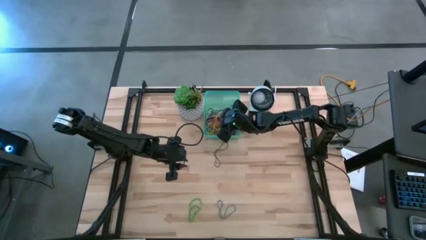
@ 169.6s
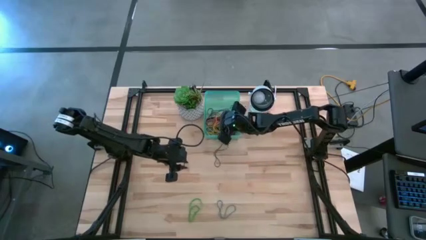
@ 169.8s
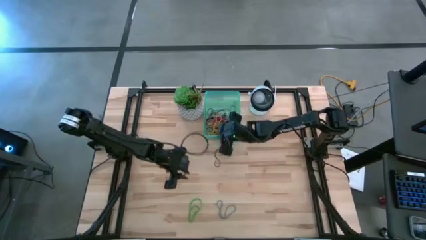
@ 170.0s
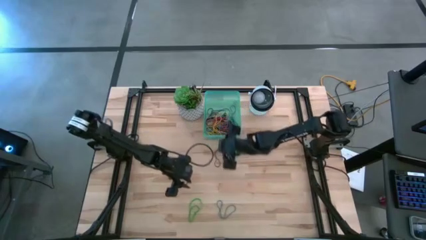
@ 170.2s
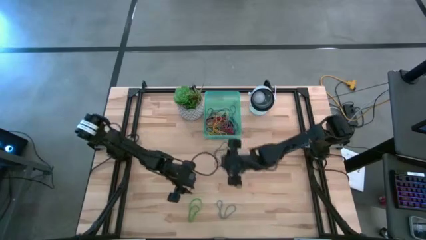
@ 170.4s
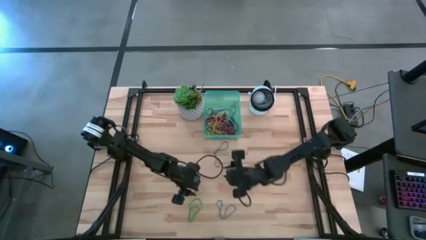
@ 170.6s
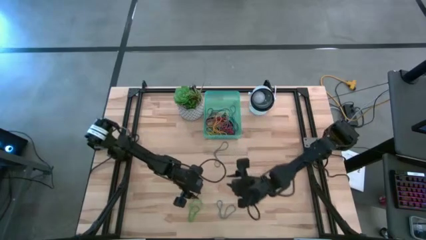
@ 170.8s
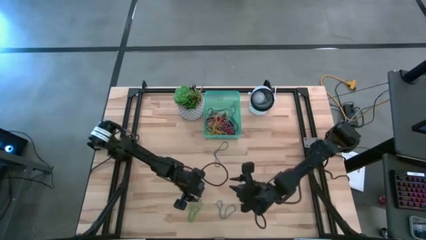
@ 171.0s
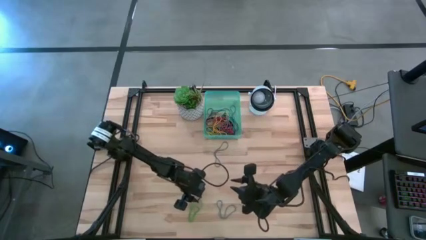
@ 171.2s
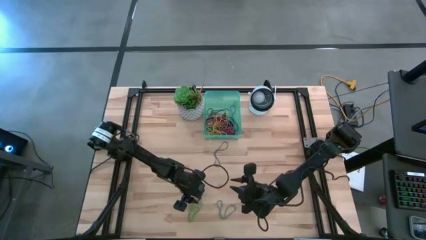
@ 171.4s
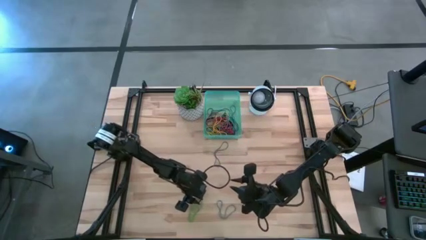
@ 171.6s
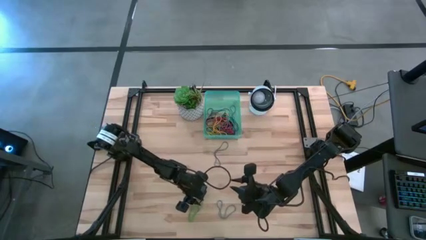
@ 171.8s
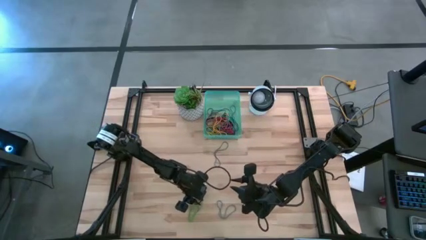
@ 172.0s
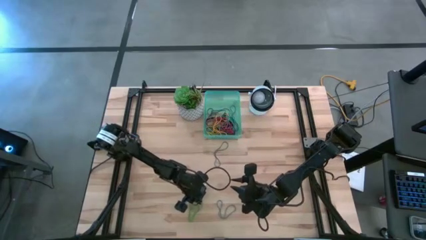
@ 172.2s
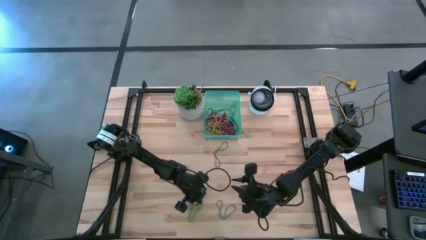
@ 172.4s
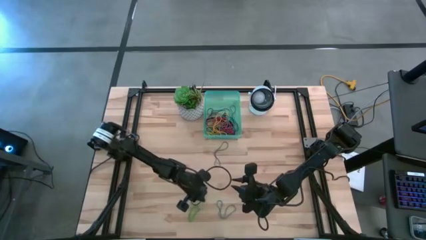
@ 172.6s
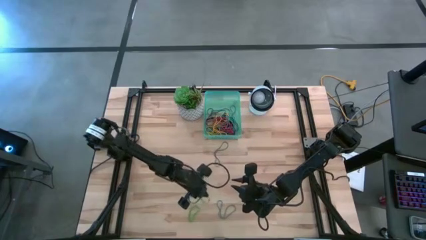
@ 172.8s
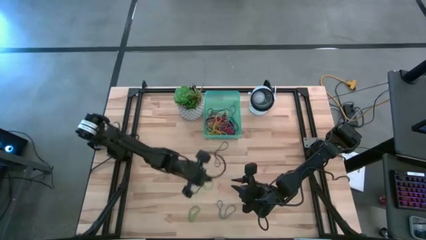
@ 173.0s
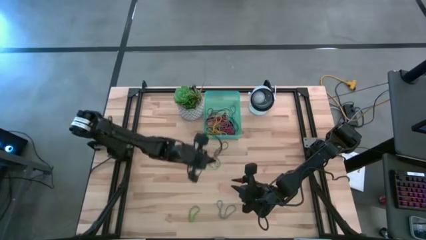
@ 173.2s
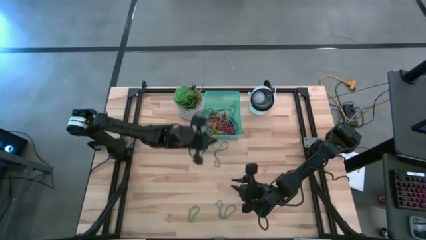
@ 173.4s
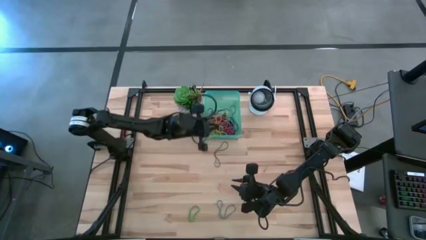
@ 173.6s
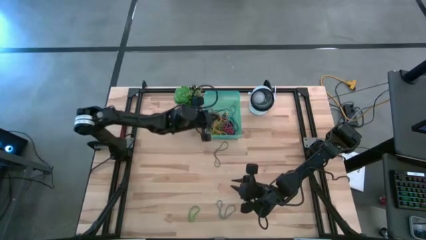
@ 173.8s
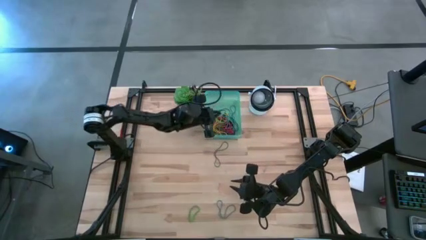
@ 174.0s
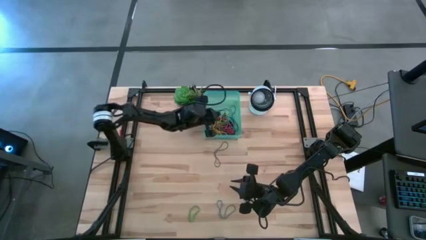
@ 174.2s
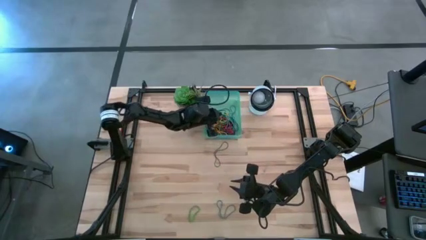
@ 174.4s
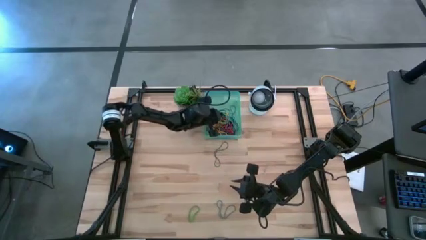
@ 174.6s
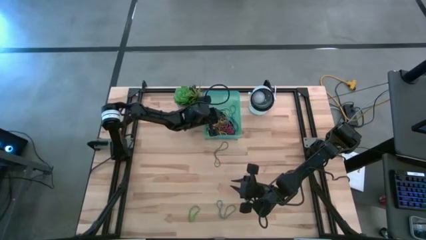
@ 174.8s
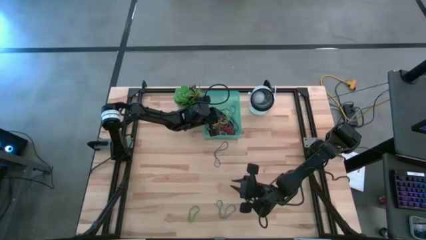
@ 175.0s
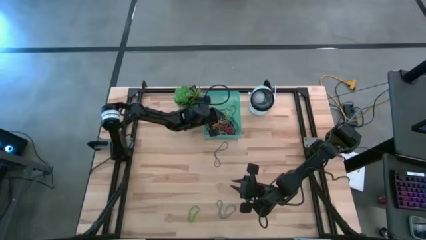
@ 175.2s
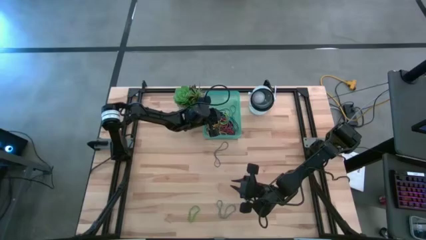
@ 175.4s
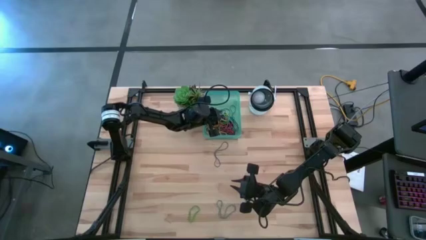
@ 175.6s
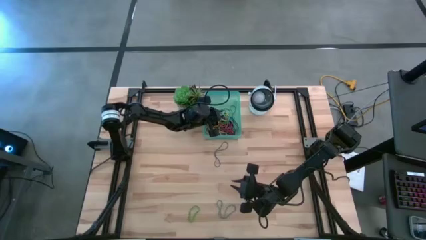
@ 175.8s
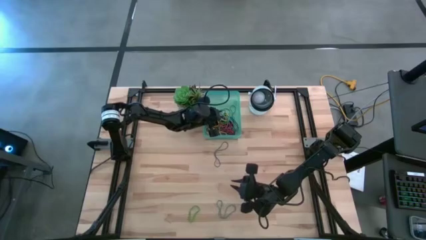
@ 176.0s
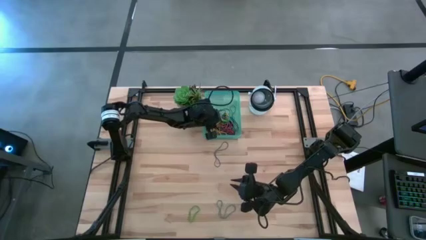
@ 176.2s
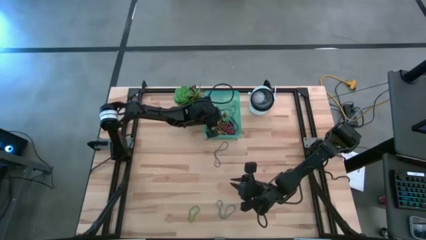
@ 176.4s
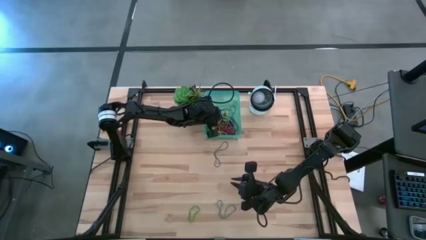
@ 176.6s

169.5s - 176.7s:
Task: Pick and place rubber bands into bin
Put the green rubber band into the green bin

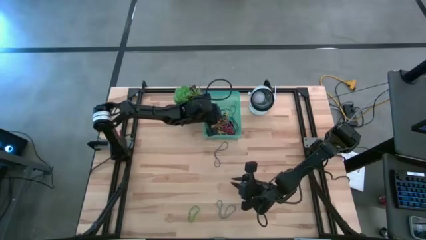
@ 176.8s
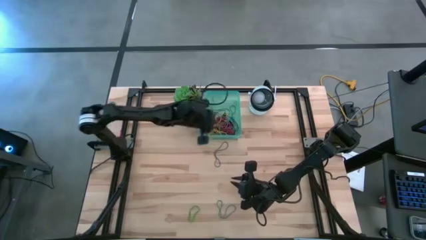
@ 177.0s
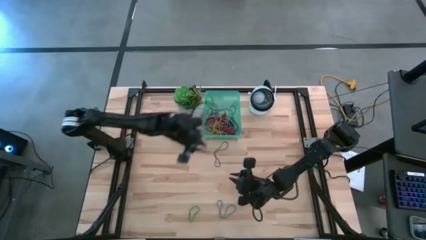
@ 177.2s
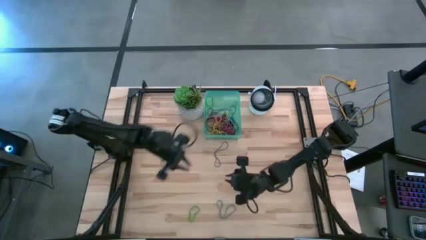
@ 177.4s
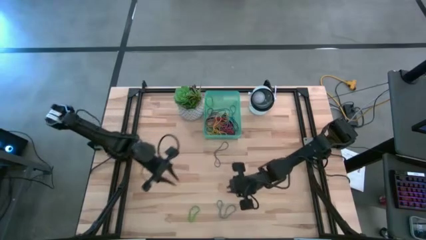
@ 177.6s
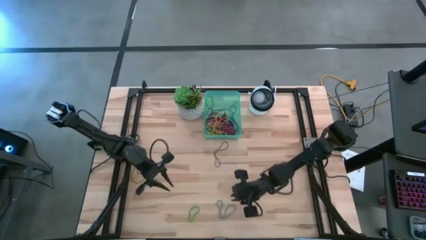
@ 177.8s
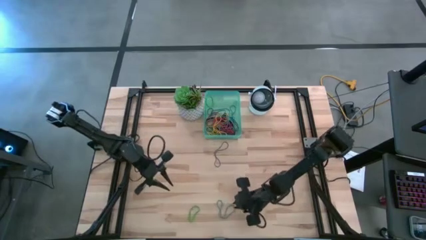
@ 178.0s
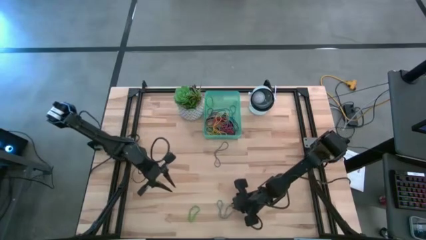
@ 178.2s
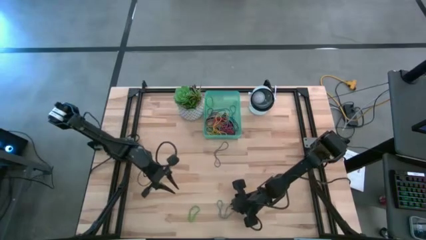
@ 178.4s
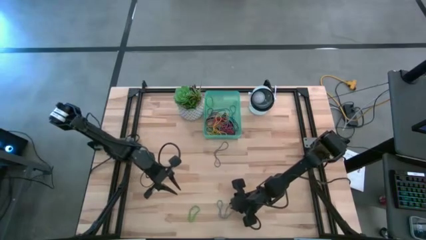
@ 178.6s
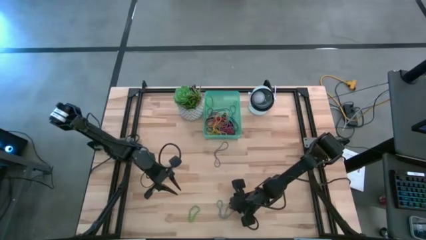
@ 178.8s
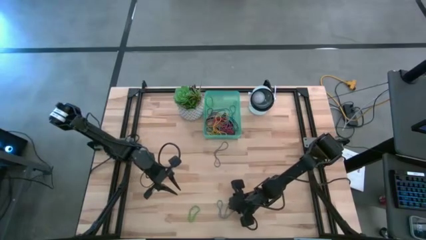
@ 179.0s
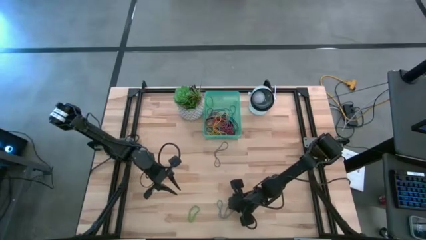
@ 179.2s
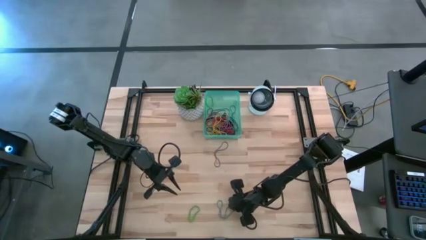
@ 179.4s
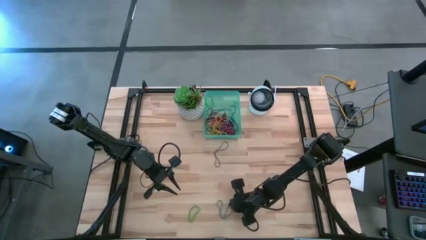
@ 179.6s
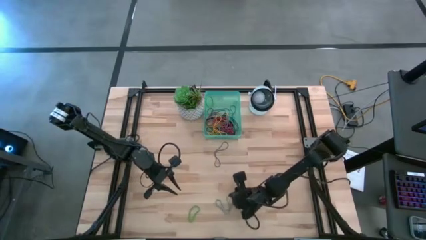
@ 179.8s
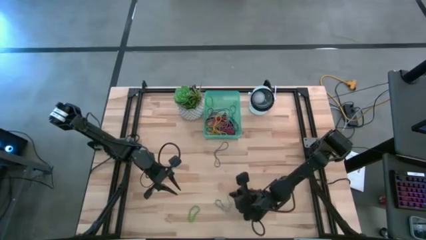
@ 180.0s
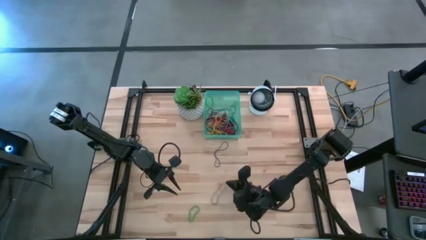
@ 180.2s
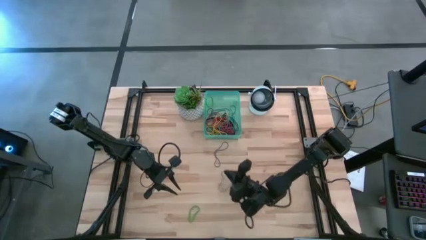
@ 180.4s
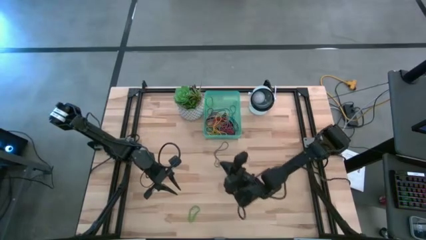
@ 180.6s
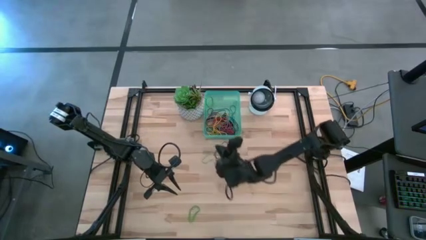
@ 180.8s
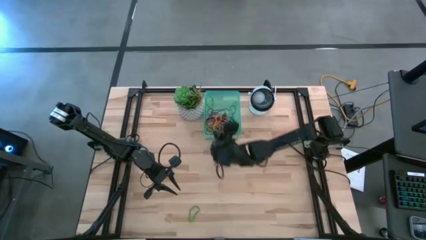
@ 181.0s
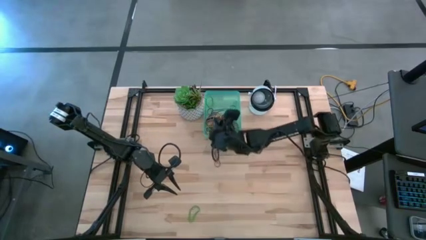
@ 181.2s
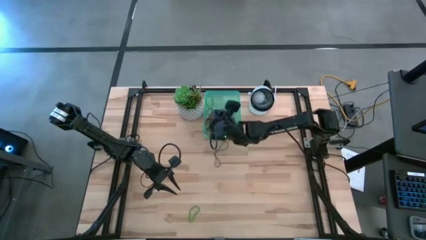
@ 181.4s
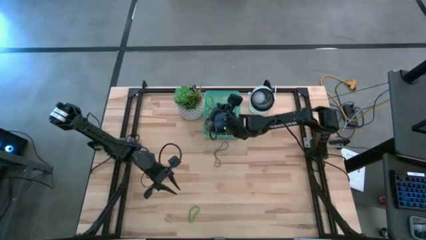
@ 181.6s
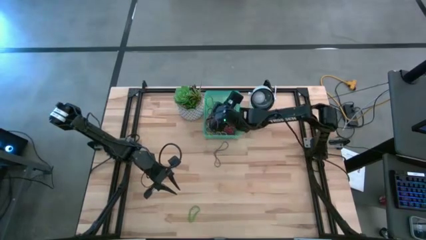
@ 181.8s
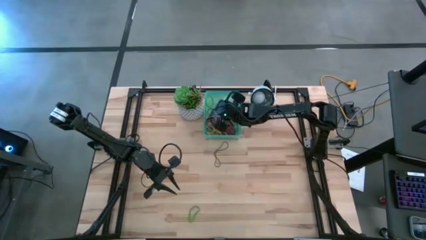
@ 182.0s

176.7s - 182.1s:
Put the blue rubber band into the green bin

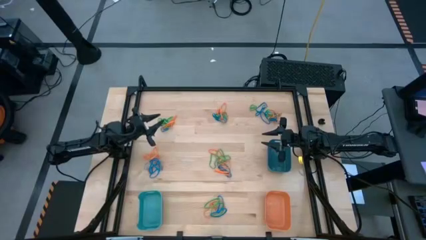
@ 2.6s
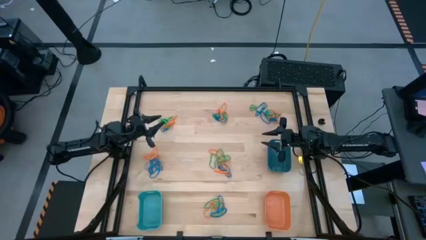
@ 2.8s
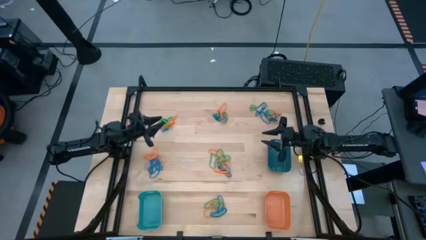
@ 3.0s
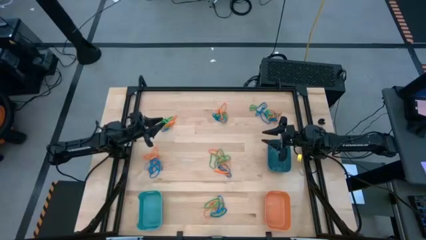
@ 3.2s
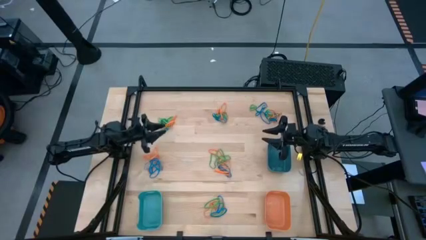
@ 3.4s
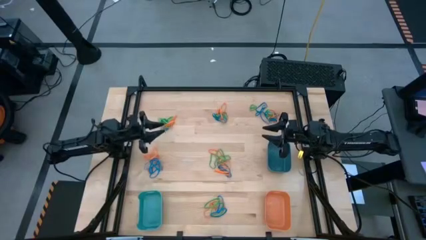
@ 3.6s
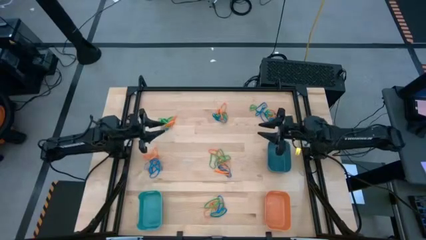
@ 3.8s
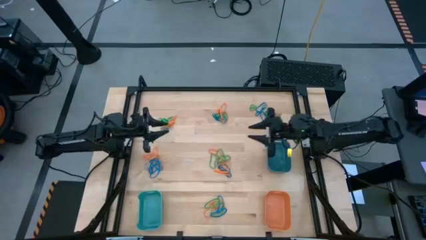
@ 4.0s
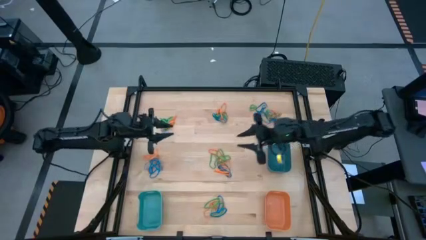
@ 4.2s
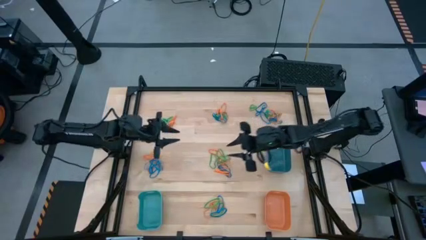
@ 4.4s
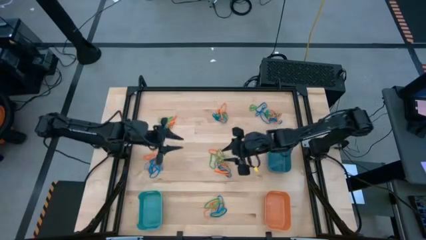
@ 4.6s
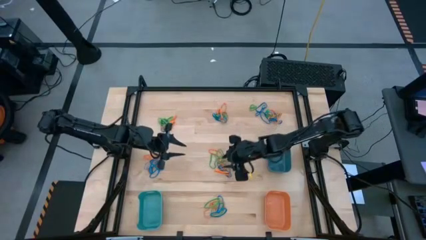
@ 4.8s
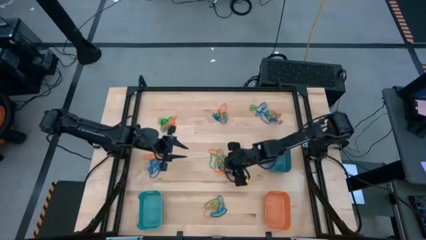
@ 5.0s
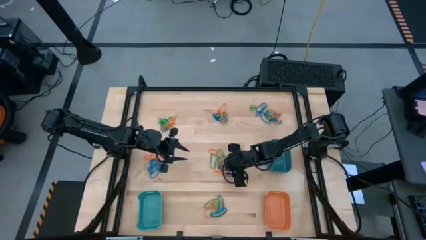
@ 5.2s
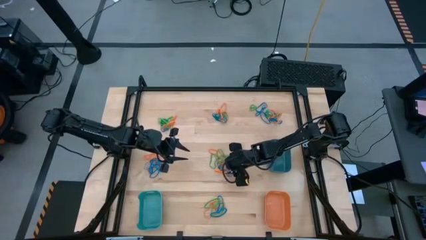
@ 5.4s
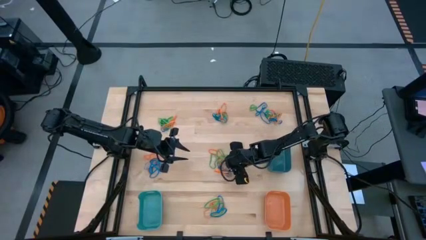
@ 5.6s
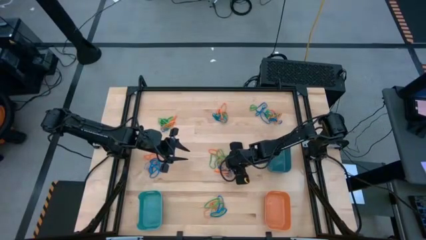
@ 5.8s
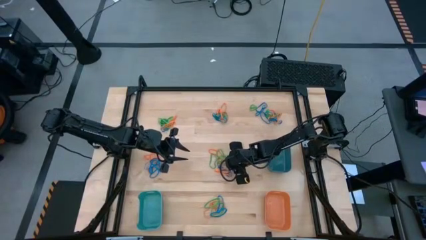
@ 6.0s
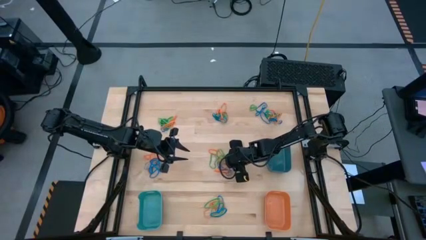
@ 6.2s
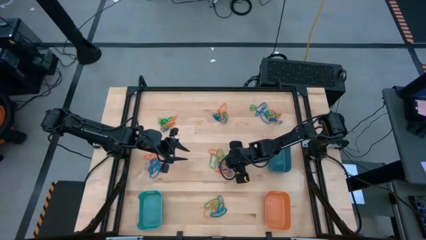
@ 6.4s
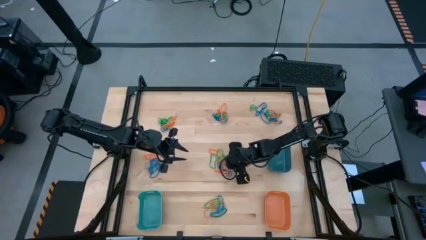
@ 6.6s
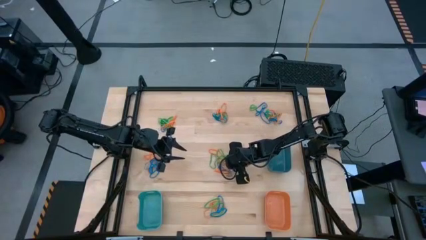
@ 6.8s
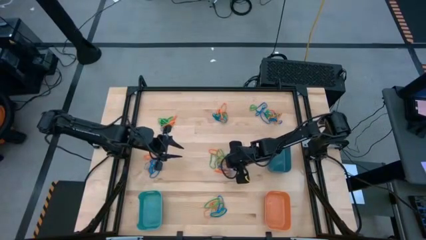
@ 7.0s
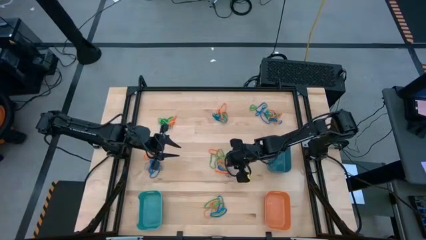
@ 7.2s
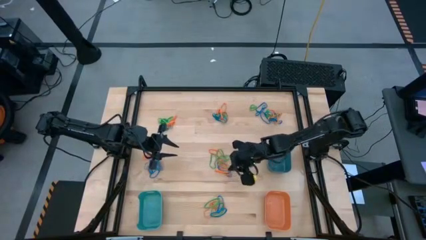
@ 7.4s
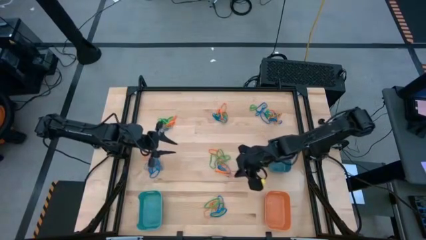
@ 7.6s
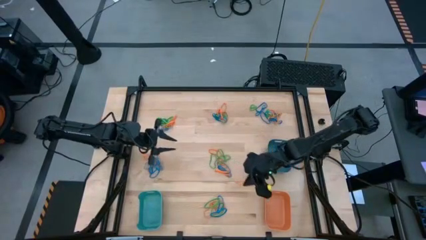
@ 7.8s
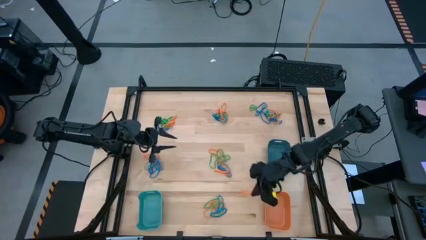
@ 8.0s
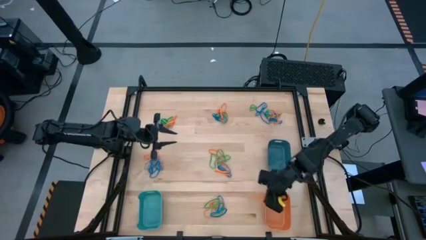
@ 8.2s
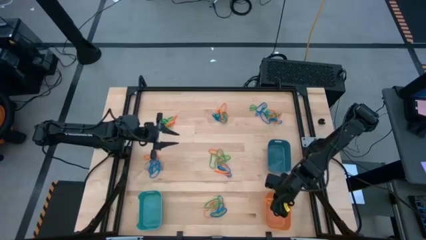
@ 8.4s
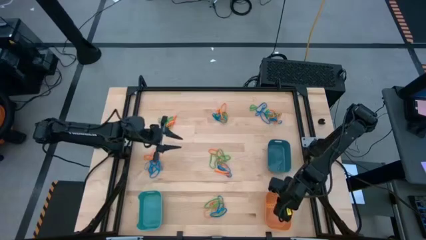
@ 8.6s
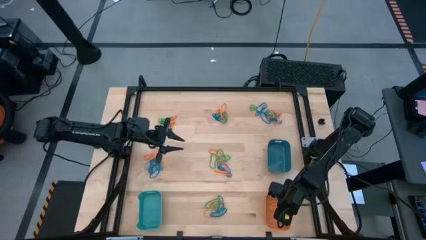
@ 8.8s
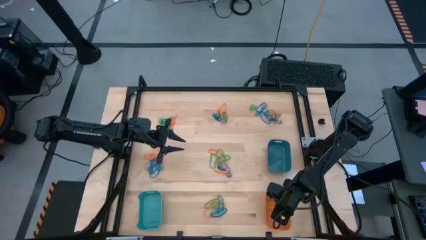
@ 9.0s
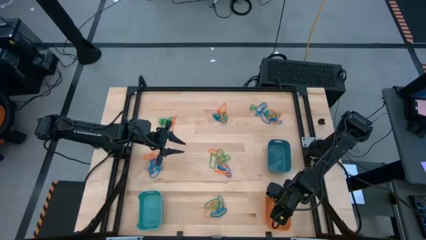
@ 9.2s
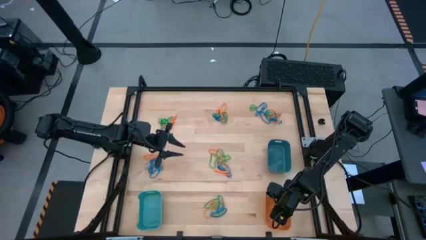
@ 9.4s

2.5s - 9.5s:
Task: Sort rubber bands into baskets
Put the orange rubber band into the orange bin
